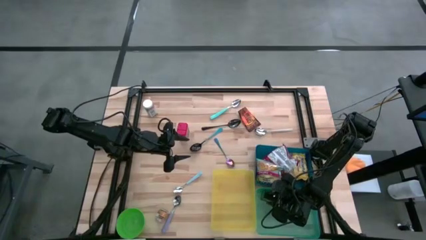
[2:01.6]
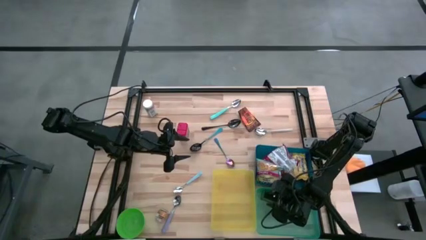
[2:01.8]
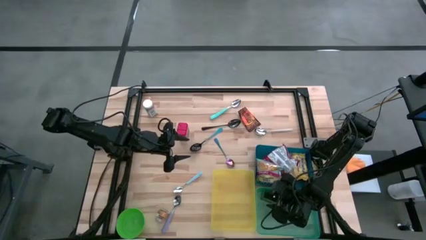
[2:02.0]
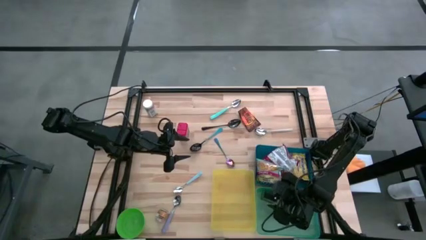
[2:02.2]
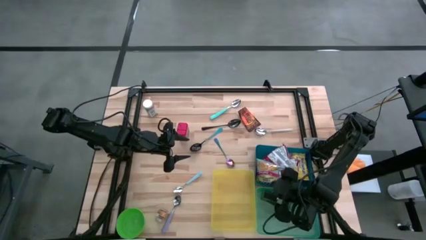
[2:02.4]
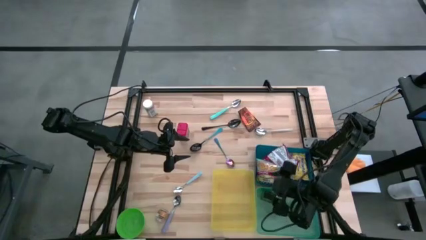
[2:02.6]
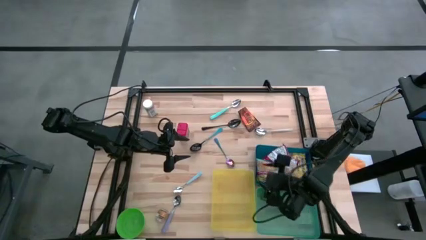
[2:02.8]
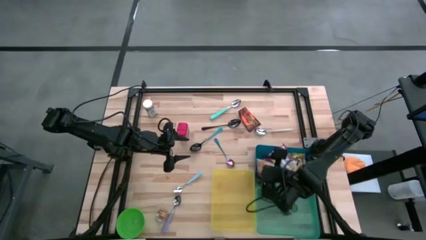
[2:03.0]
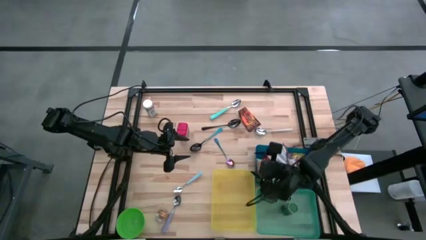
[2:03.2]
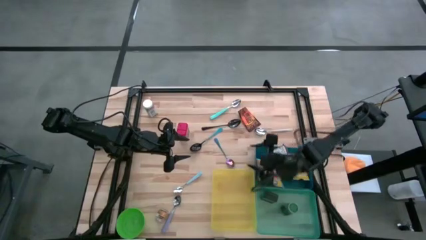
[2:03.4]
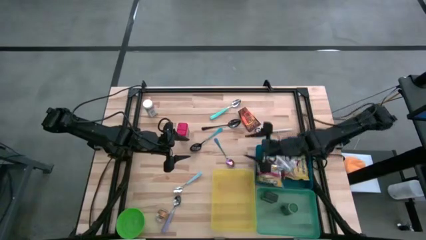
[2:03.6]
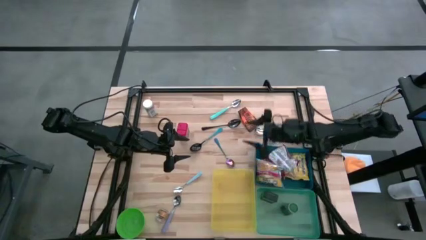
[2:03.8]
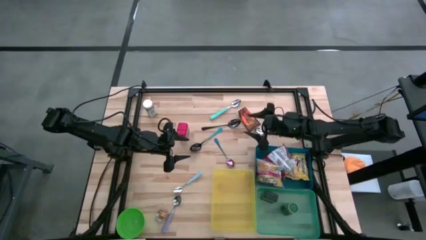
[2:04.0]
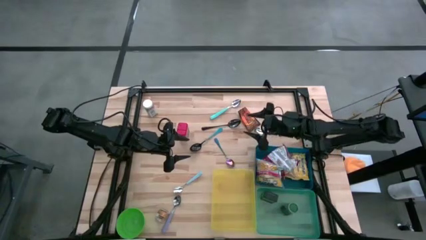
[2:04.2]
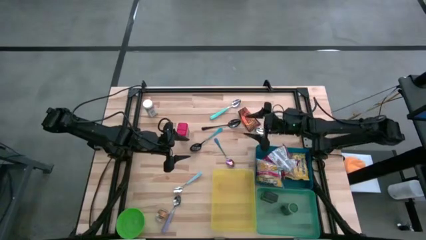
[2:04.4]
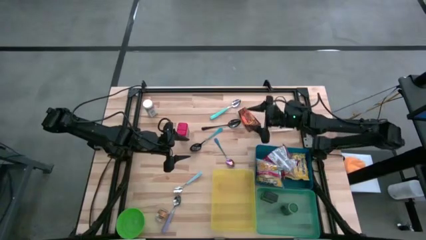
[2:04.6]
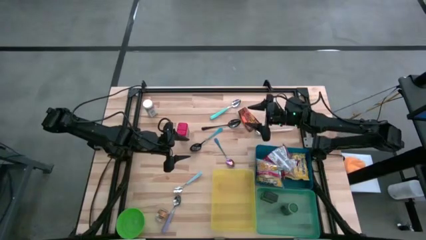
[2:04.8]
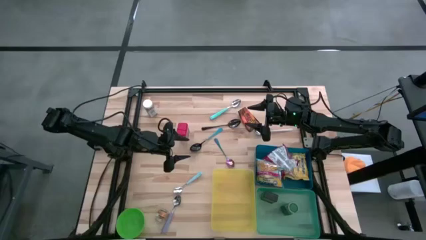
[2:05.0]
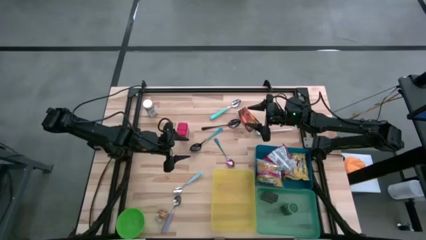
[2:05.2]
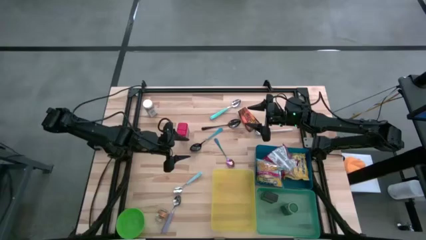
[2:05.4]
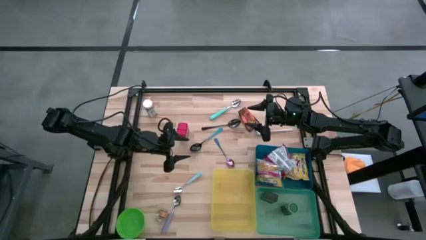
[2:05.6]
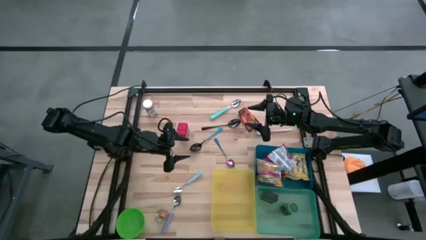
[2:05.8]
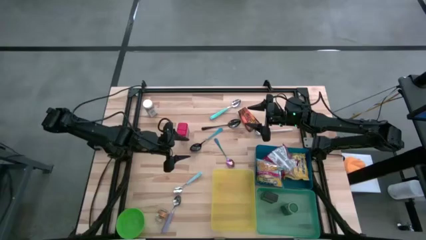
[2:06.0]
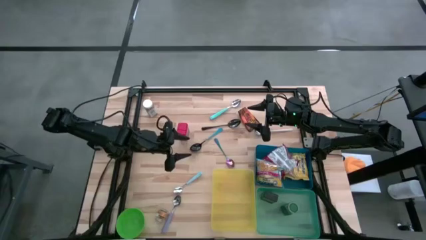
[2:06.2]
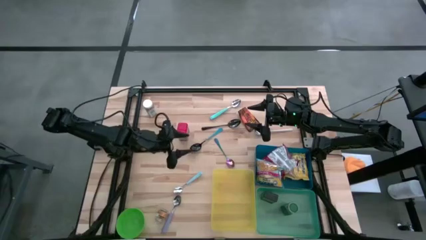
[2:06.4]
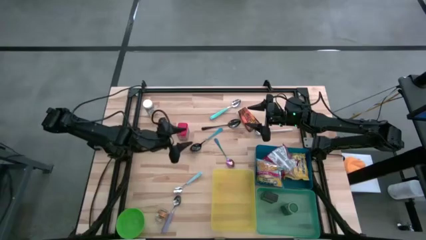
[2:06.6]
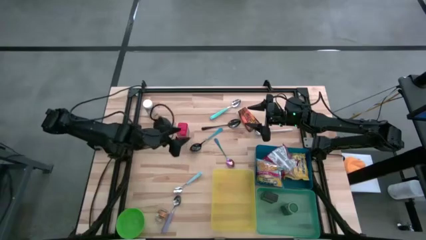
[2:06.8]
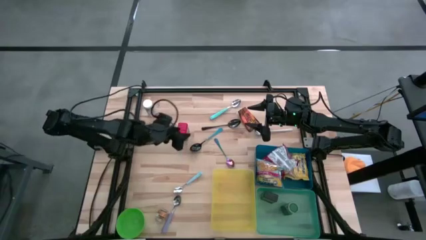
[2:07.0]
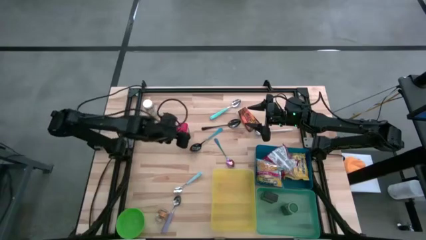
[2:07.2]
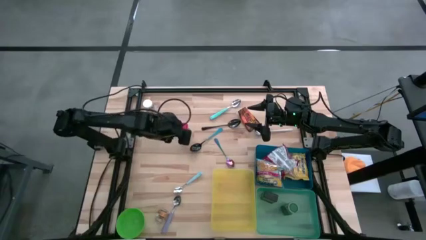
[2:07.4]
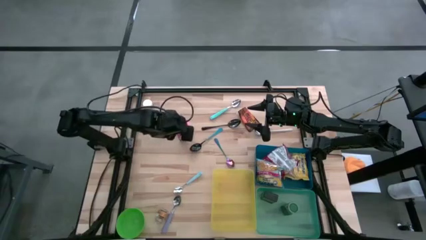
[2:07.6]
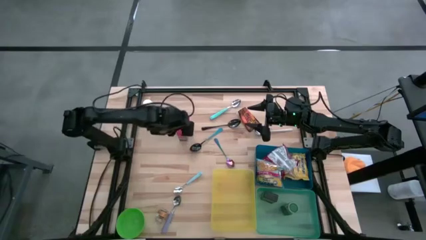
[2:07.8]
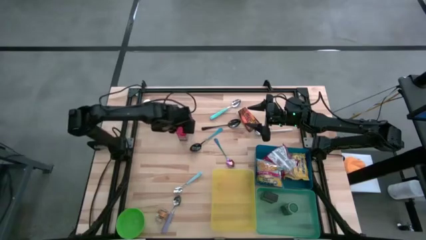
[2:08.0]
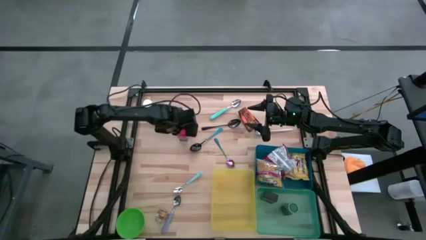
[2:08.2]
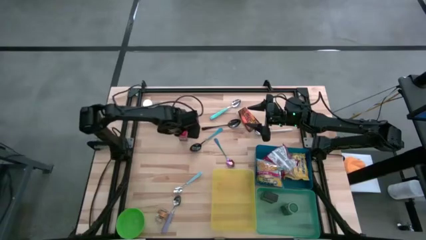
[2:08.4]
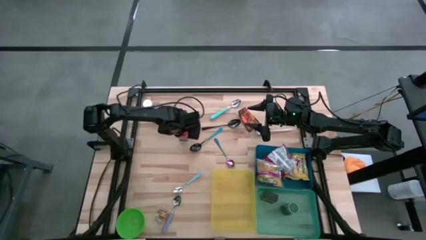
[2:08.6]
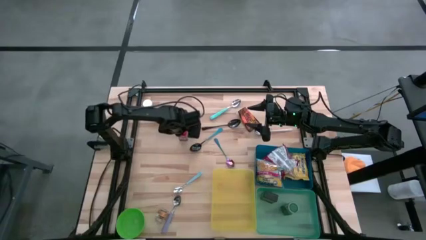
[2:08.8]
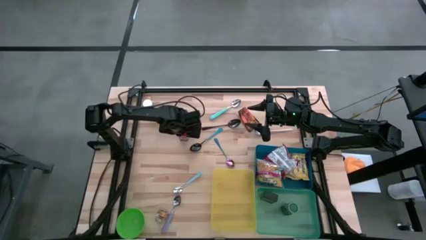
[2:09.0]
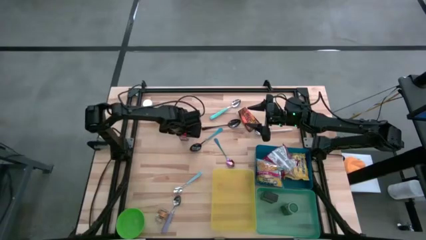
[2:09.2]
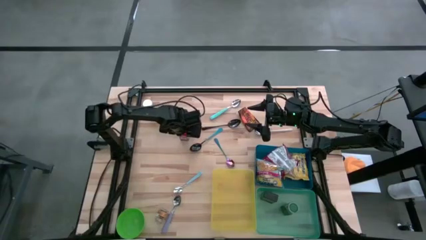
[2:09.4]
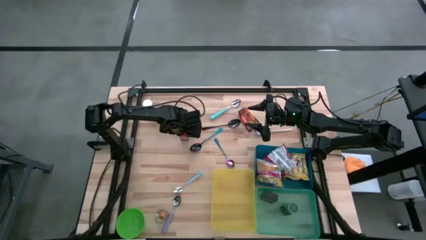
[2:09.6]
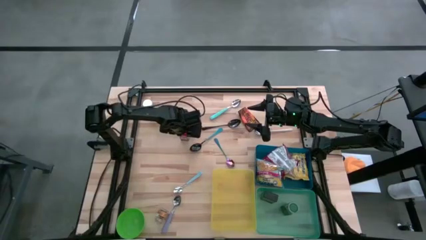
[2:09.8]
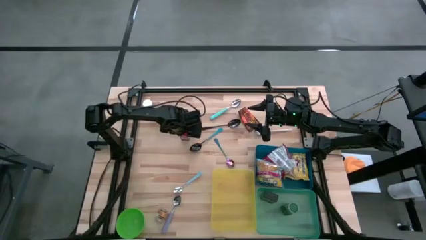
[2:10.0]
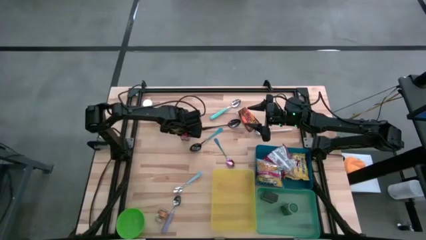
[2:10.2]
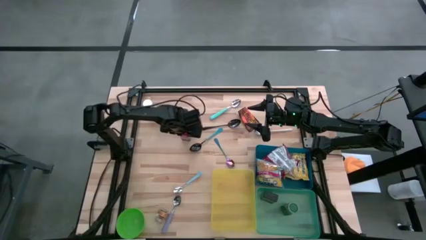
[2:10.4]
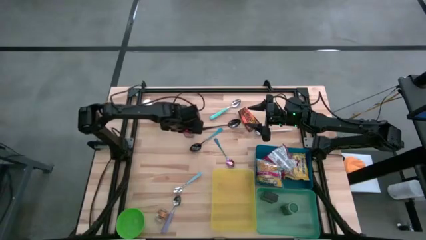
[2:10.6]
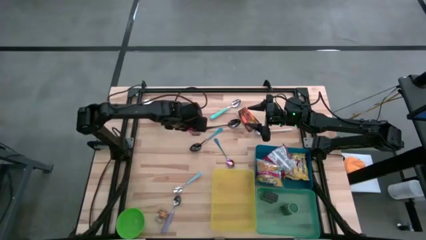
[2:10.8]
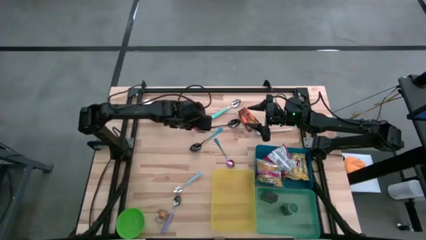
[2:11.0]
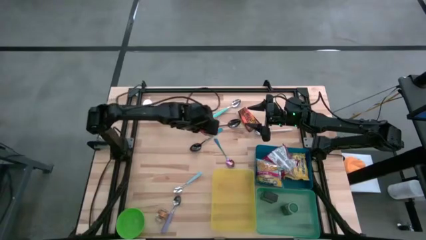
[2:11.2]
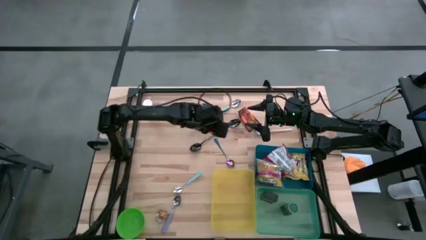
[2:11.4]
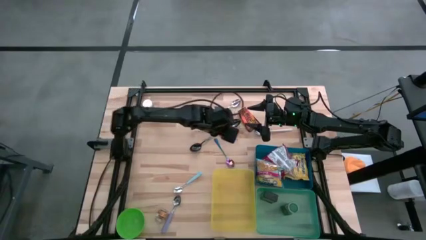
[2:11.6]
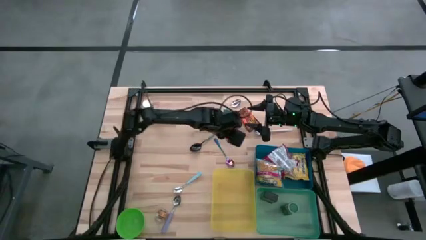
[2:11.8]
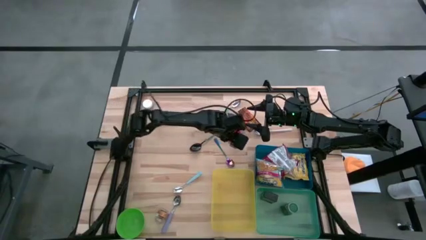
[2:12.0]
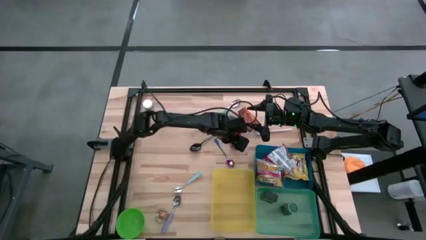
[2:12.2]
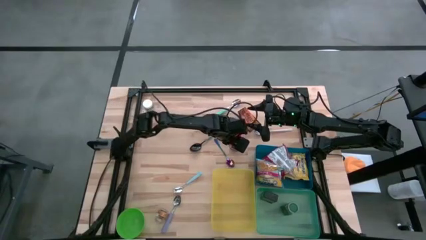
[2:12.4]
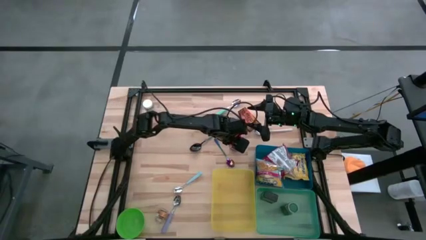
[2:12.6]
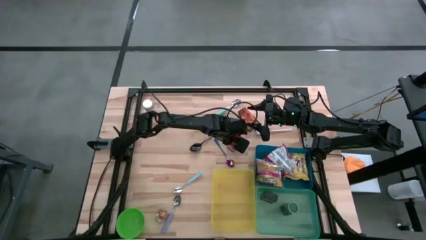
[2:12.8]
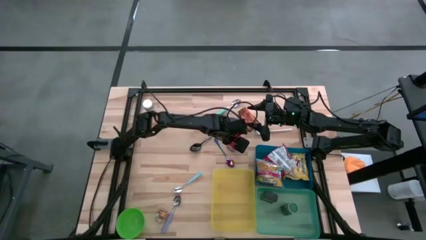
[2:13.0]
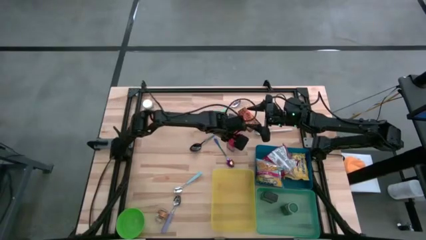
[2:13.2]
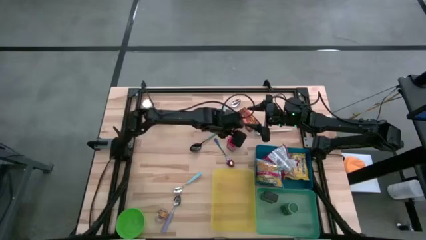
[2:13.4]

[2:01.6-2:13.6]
Put the red seasoning can into the green bin

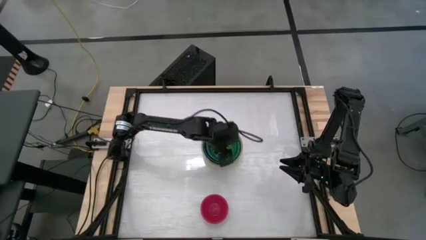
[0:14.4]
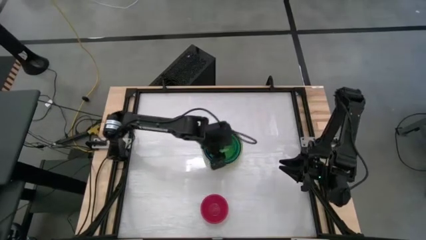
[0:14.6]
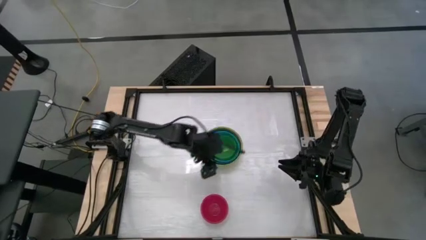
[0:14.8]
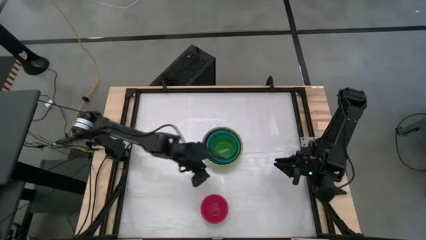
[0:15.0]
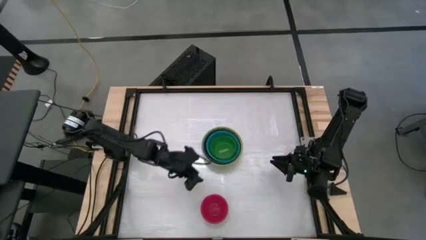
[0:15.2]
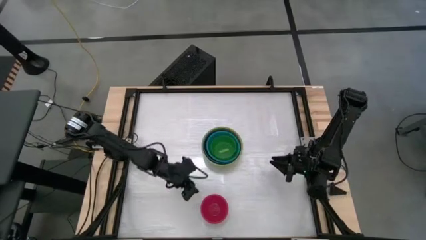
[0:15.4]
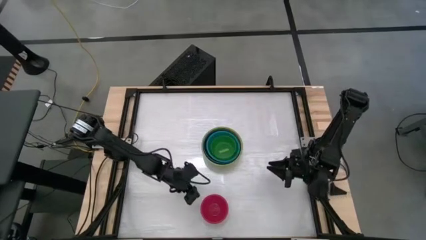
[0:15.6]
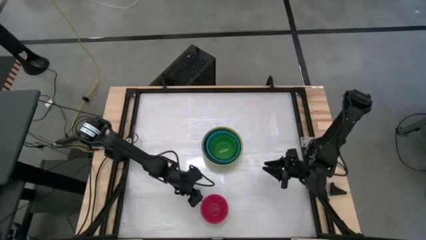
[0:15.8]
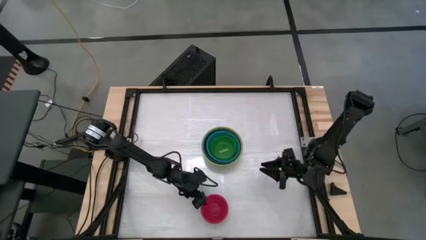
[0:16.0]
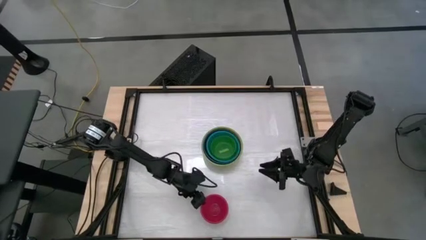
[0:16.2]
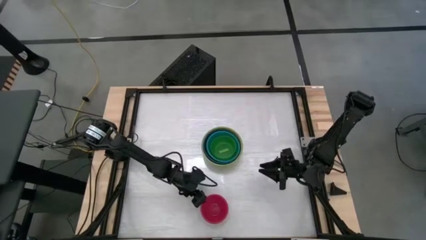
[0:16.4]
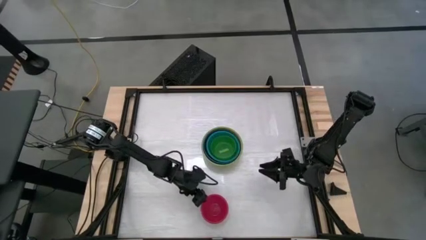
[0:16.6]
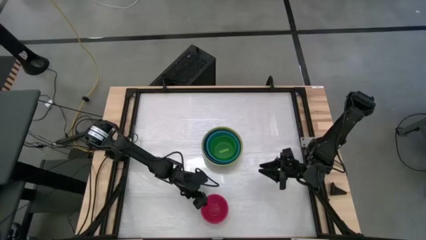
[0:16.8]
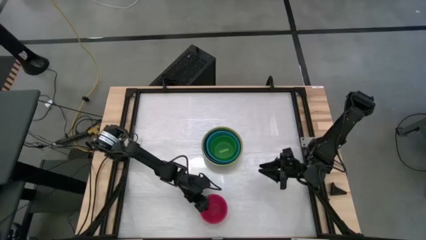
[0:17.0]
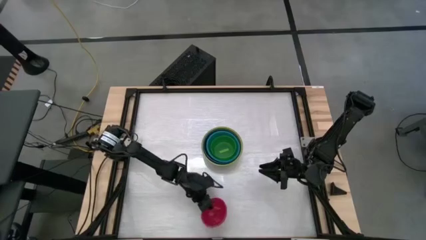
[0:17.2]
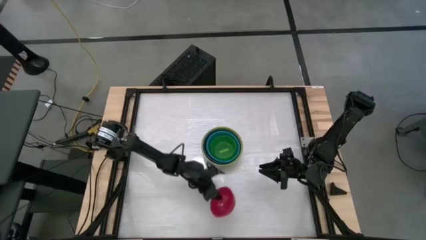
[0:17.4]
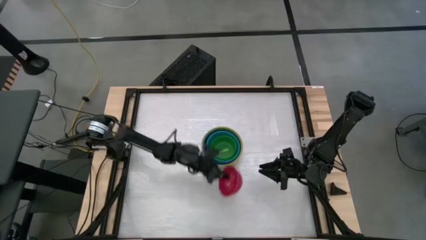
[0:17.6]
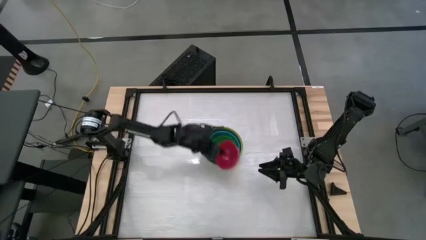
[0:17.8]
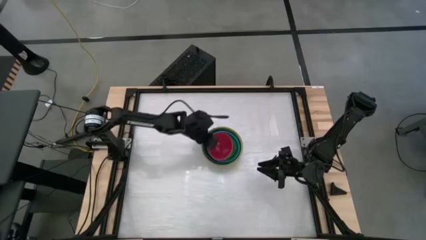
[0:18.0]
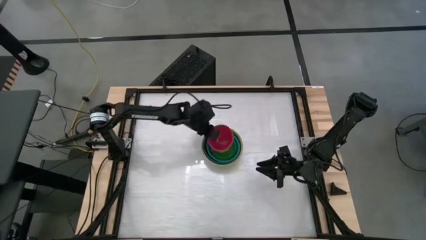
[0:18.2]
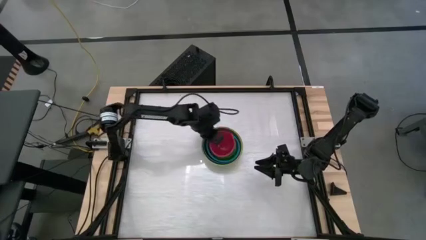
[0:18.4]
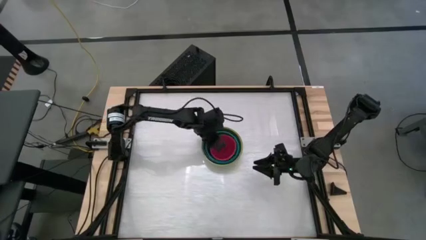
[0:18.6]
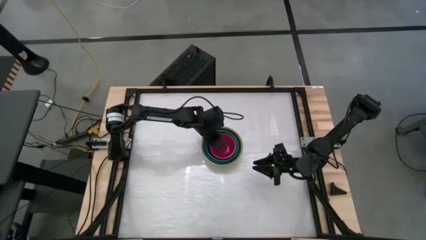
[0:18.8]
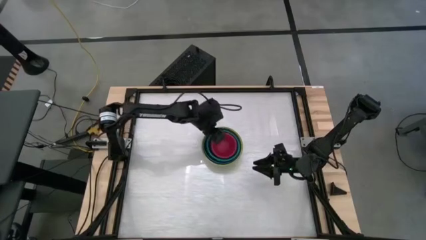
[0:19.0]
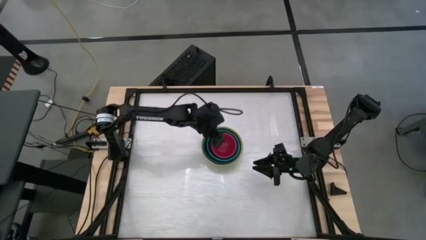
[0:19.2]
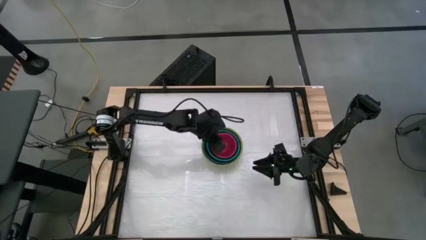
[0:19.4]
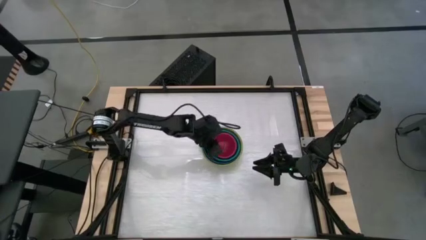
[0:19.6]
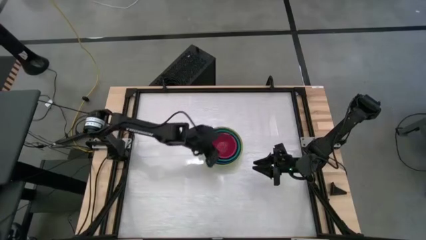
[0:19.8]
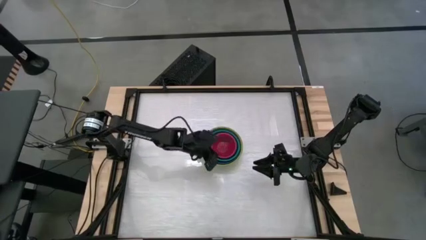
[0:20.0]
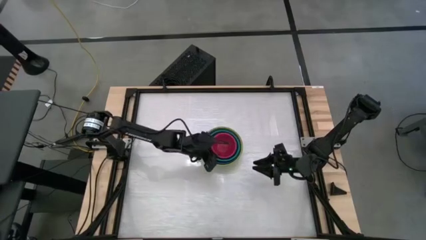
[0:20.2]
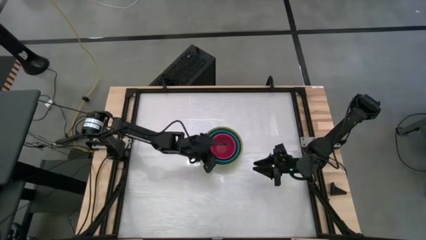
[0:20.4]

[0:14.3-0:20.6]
Stack the red bowl on the green transparent bowl
